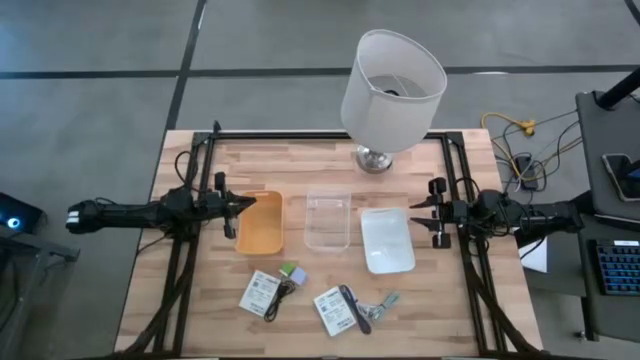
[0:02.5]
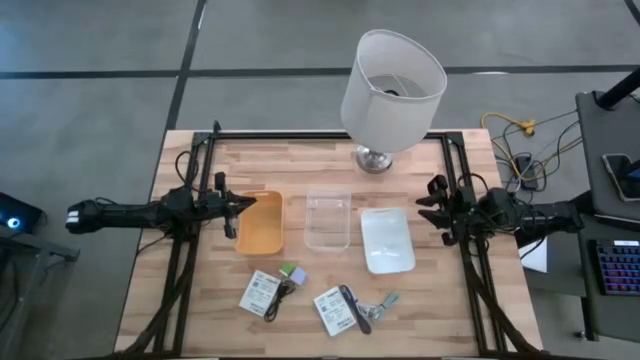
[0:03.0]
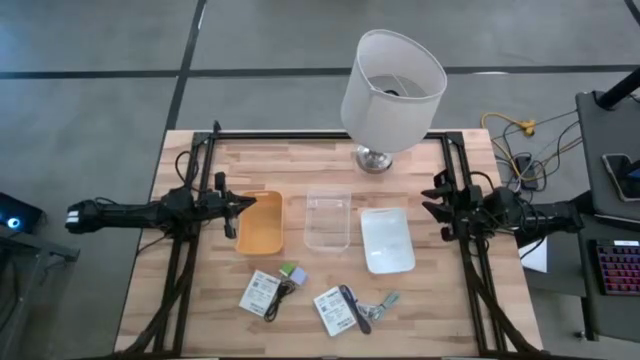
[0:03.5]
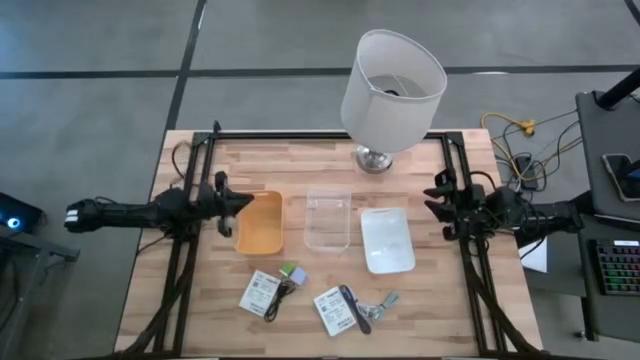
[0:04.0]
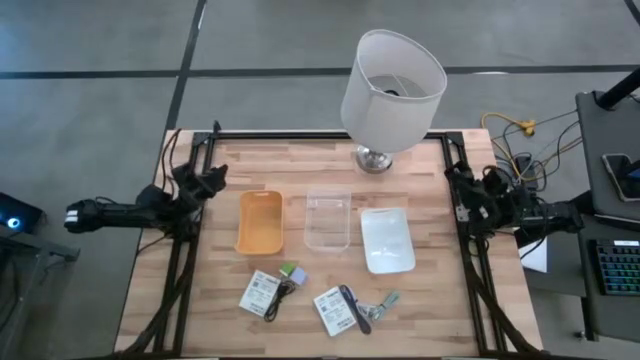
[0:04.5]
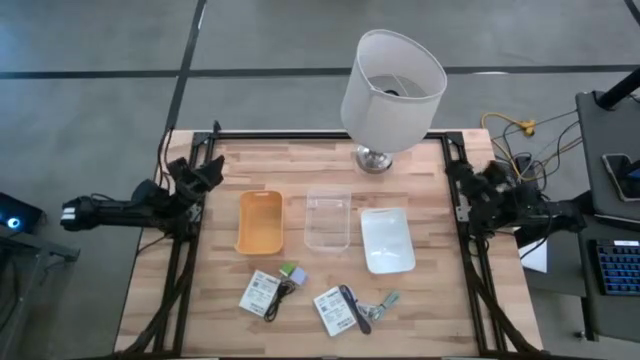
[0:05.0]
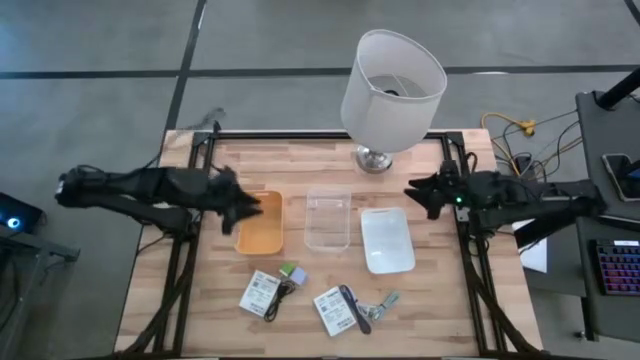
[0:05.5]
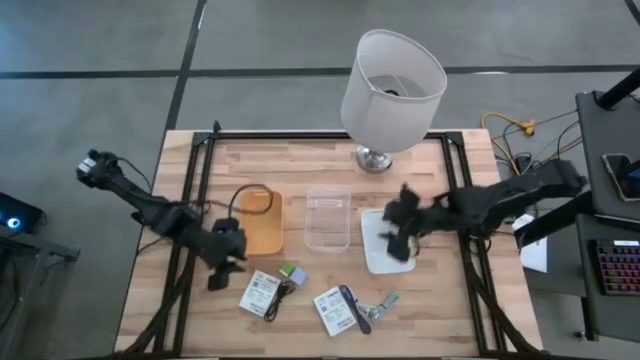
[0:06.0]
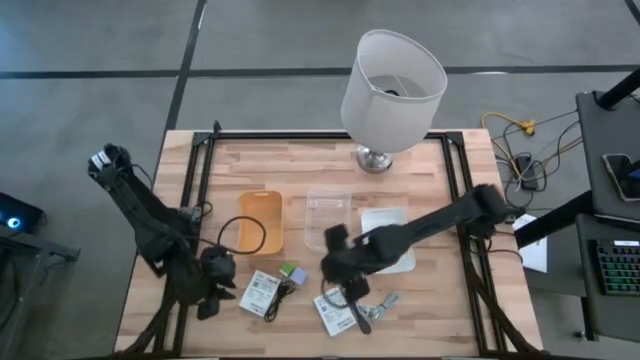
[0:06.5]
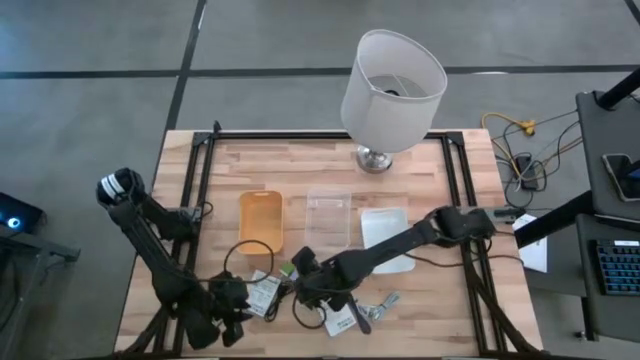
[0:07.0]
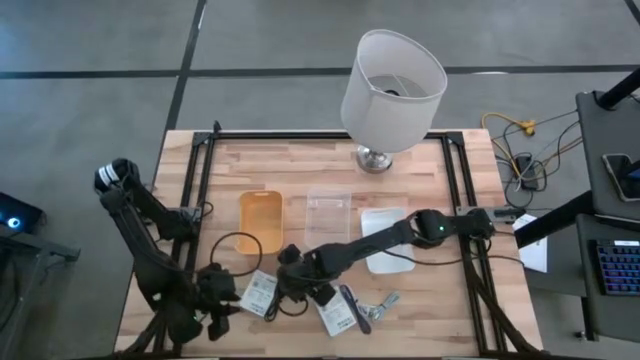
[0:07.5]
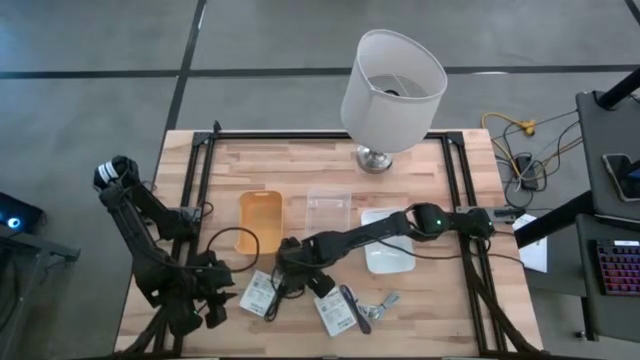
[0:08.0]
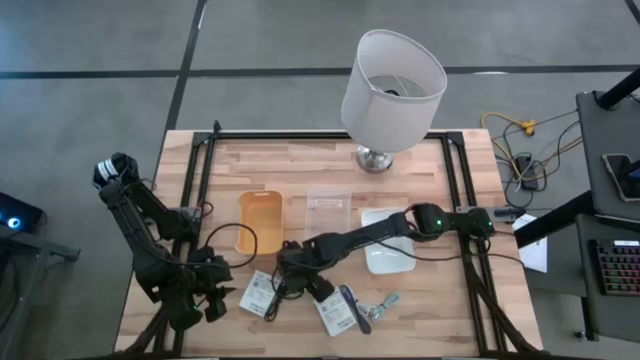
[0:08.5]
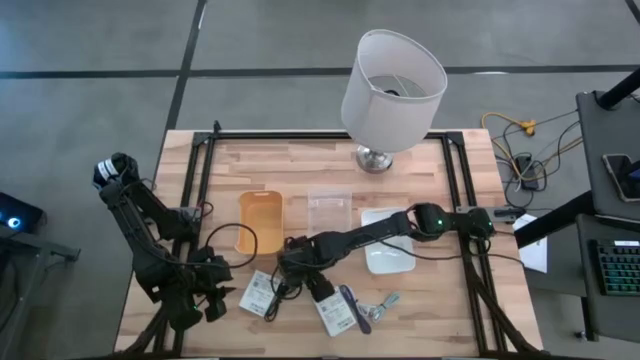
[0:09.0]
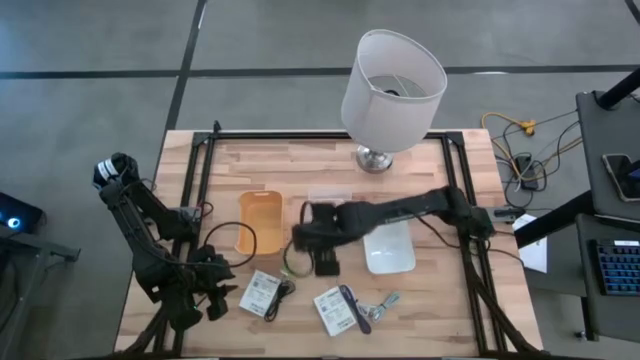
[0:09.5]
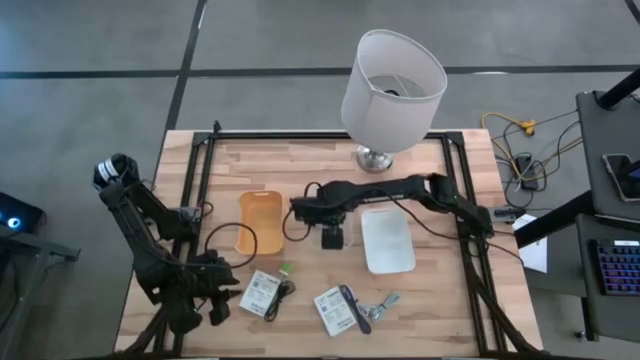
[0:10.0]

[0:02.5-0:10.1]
Task: Pick and place items into bin
Put the blue charger adapter into the transparent bin

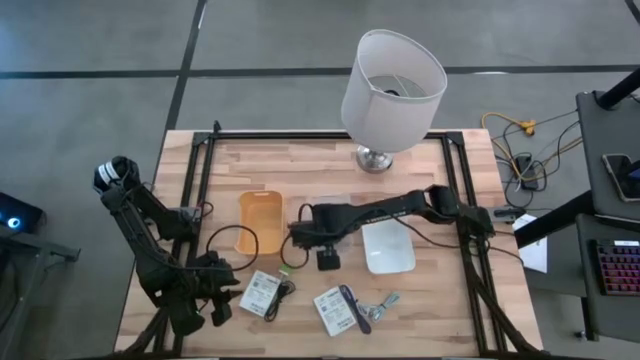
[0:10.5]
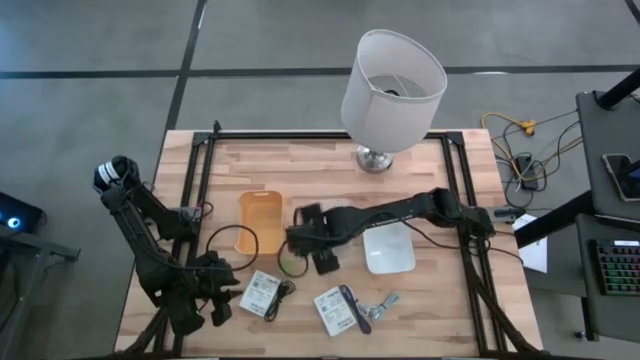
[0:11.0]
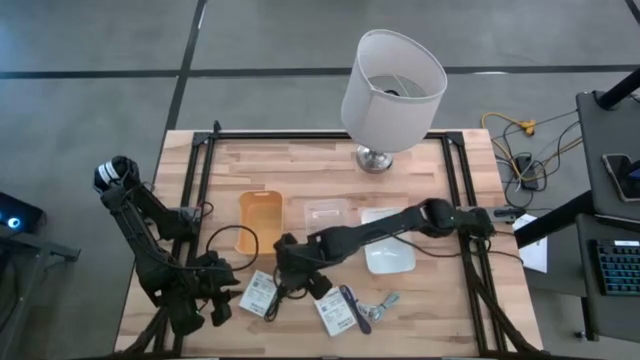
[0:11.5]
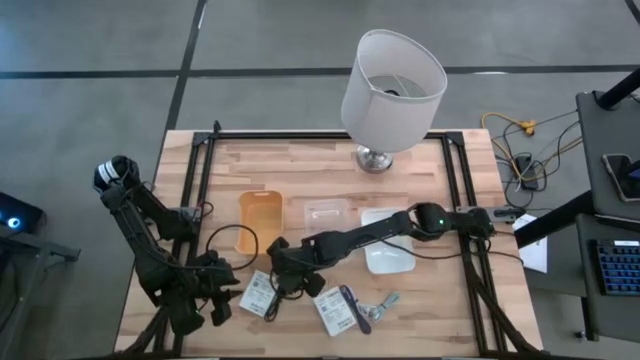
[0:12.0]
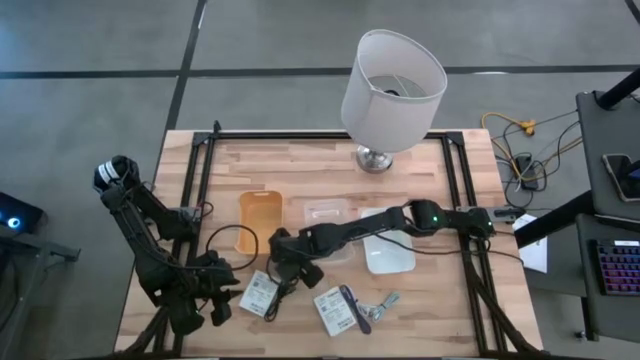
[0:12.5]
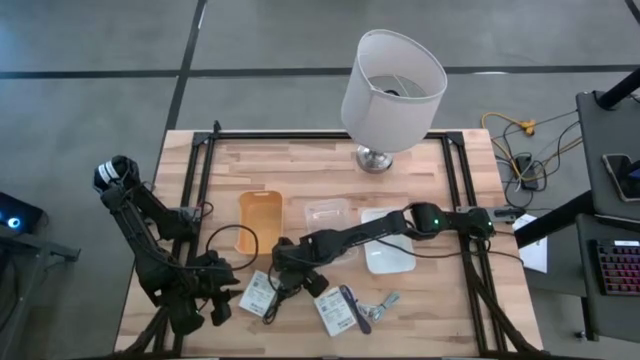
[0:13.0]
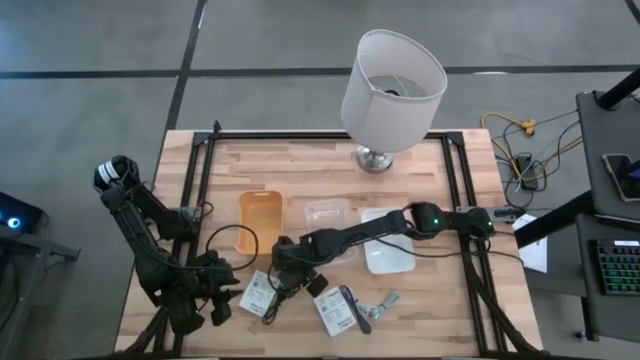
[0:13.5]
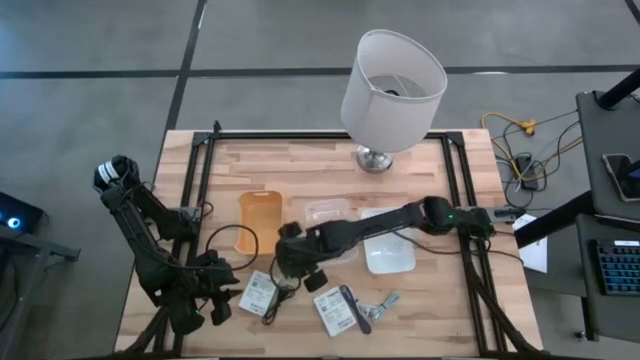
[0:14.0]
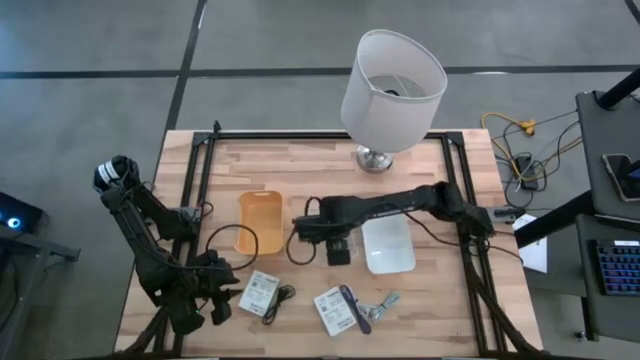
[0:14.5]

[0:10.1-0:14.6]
Put the green charger adapter into the transparent bin

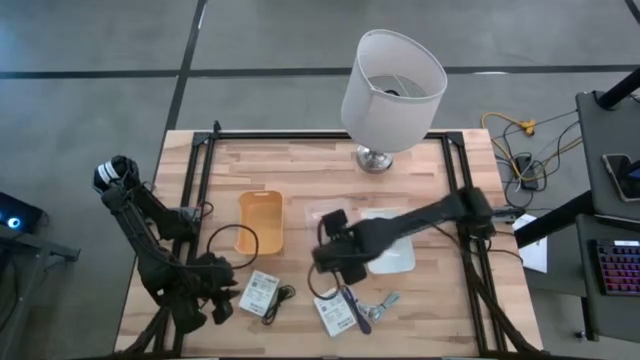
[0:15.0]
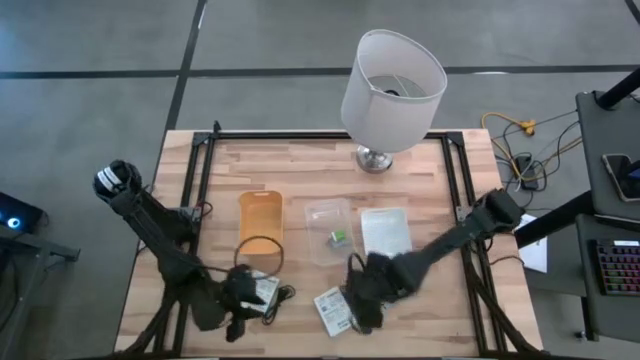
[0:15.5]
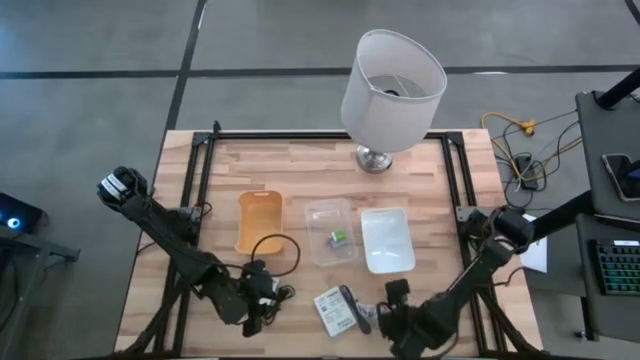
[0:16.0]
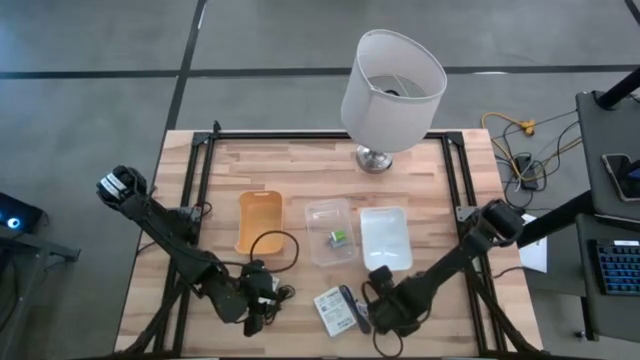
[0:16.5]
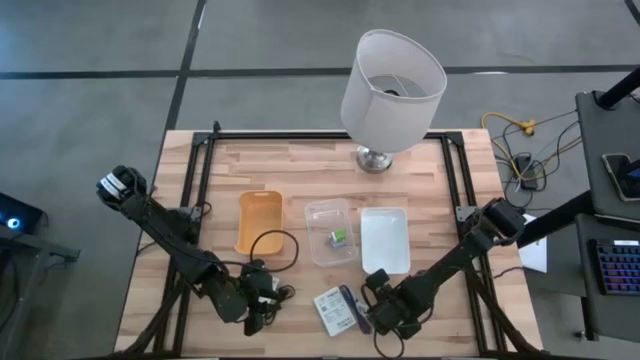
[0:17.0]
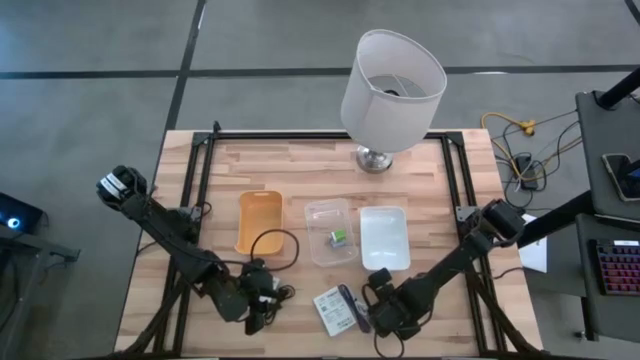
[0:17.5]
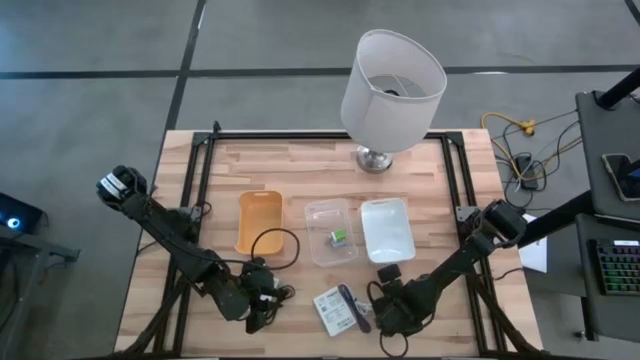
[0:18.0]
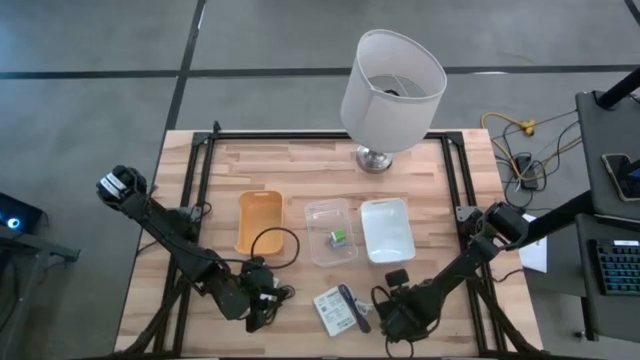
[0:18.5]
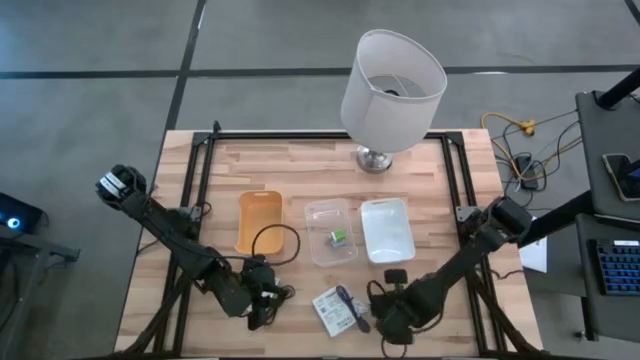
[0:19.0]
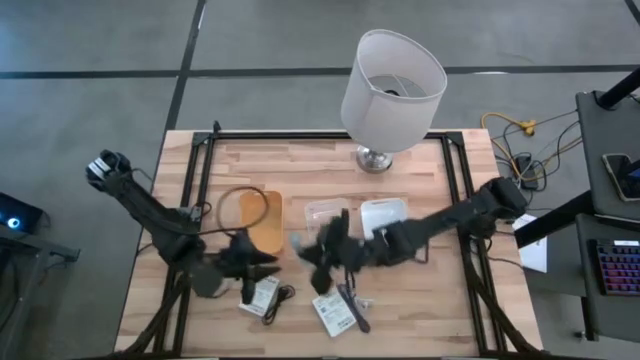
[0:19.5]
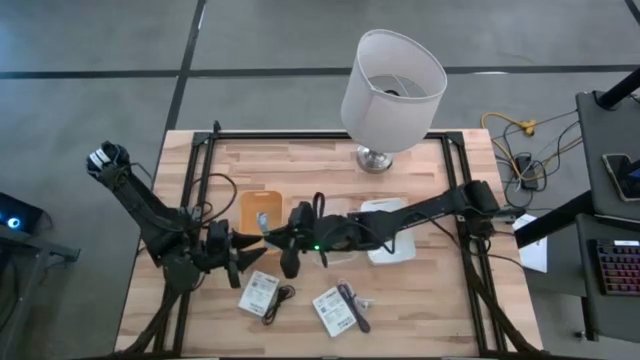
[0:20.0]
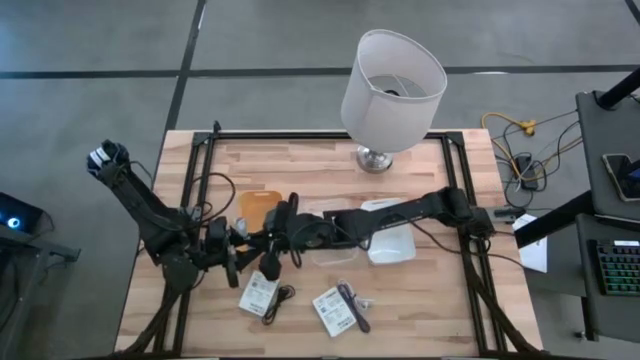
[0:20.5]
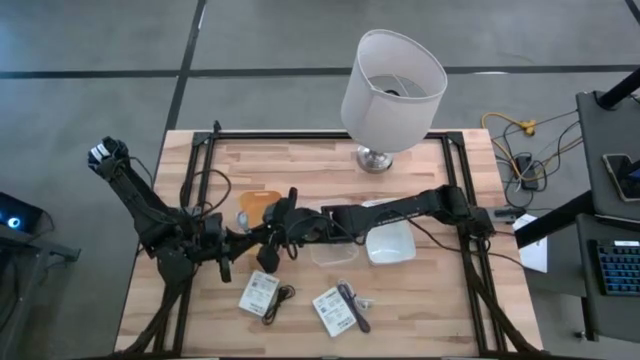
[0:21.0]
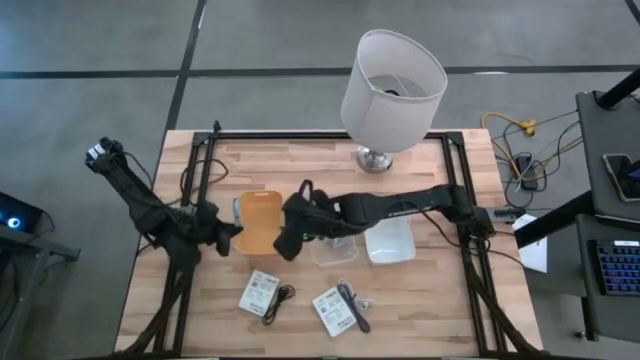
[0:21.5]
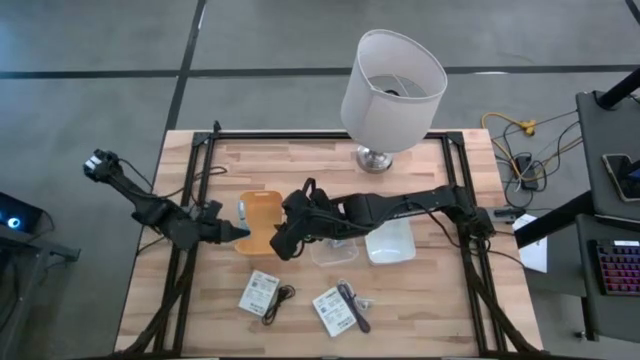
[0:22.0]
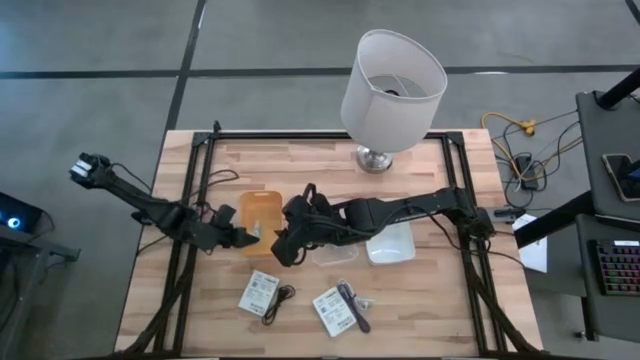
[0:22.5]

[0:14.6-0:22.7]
Put the blue charger cable into the orange bin
